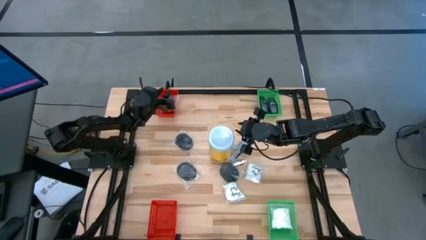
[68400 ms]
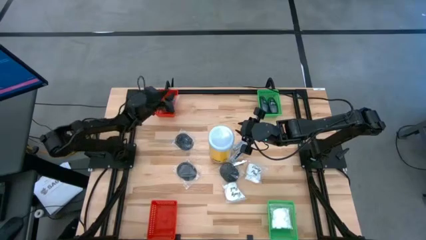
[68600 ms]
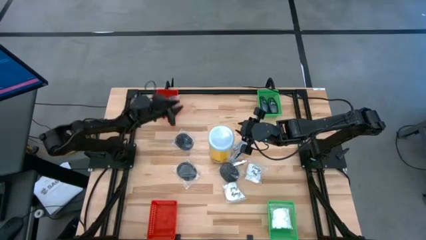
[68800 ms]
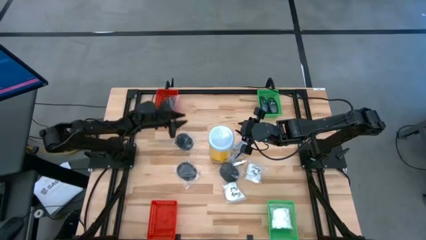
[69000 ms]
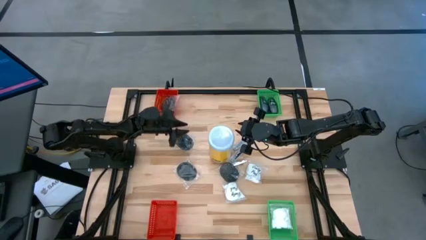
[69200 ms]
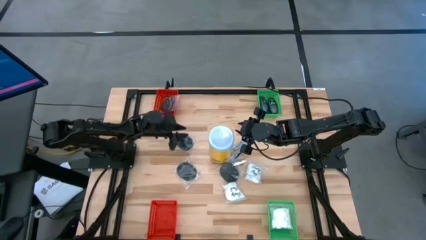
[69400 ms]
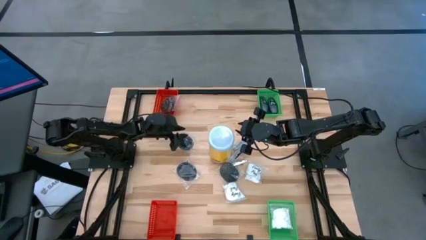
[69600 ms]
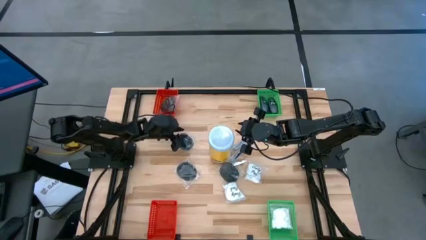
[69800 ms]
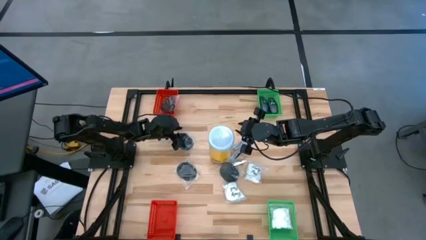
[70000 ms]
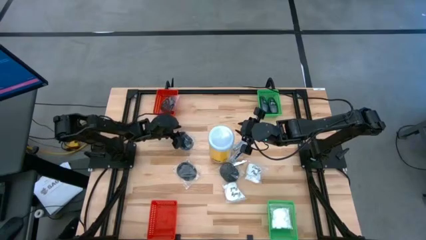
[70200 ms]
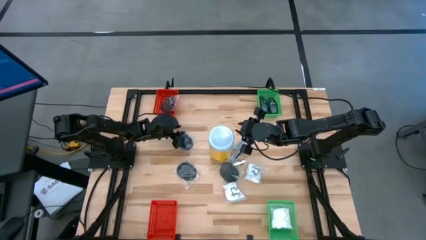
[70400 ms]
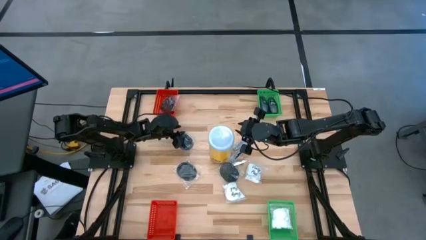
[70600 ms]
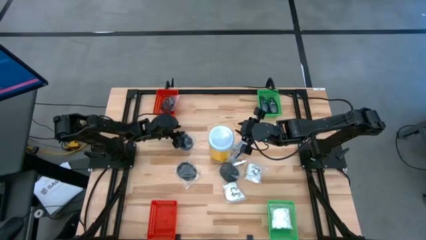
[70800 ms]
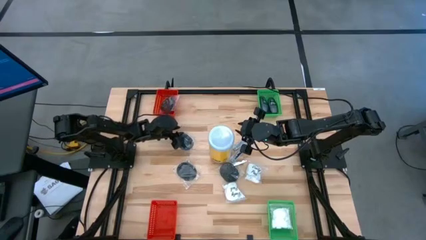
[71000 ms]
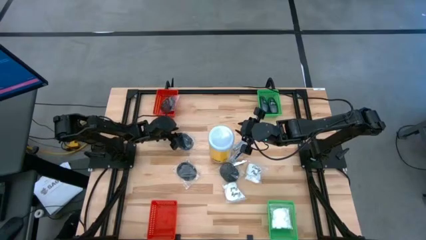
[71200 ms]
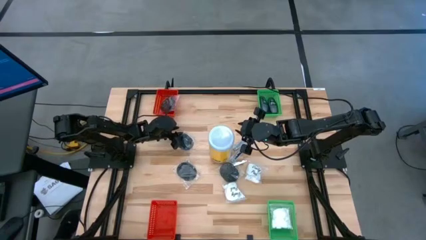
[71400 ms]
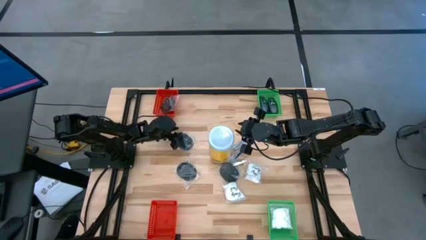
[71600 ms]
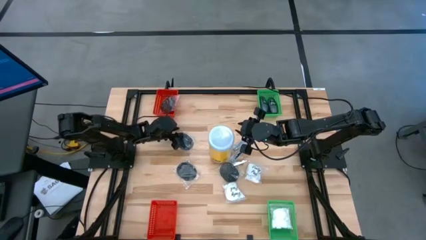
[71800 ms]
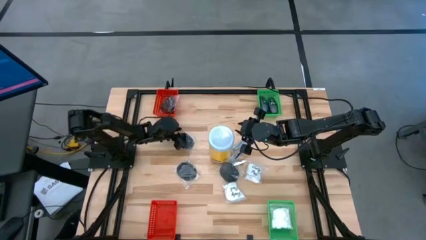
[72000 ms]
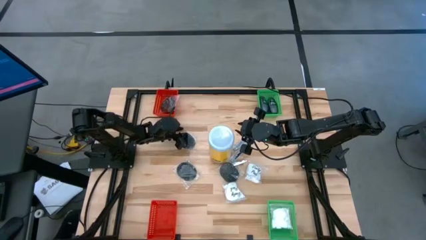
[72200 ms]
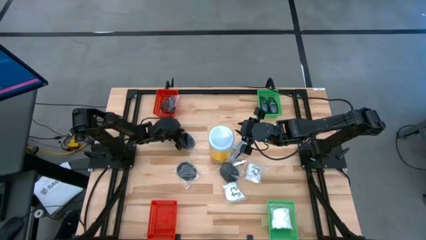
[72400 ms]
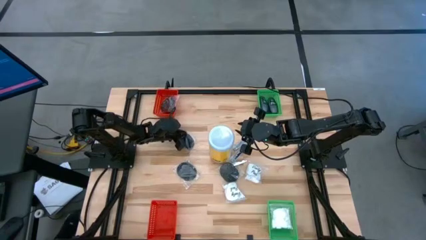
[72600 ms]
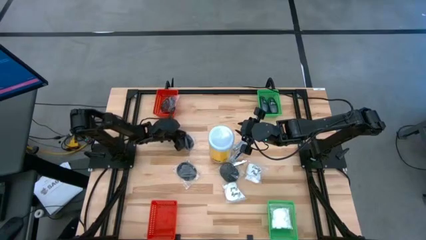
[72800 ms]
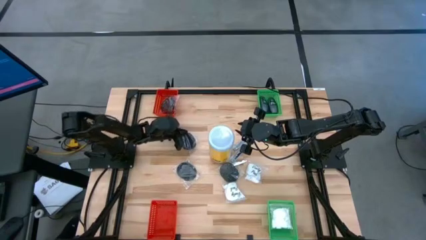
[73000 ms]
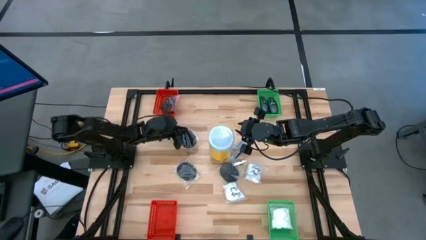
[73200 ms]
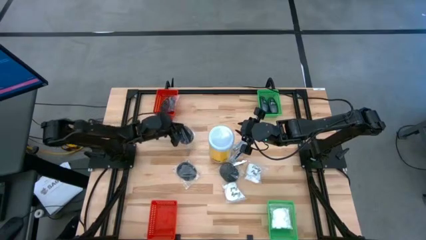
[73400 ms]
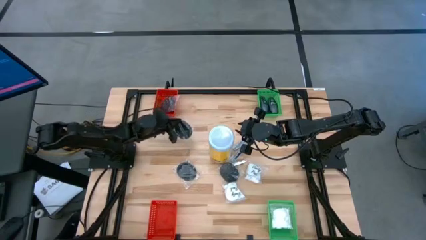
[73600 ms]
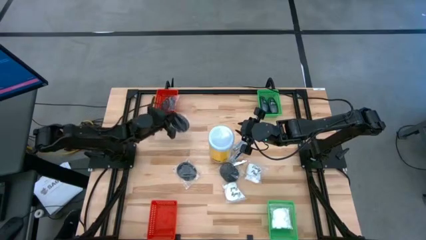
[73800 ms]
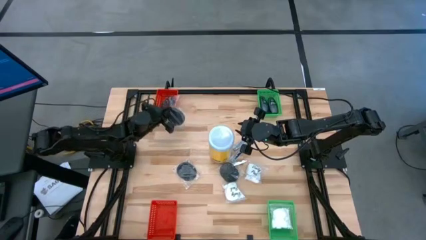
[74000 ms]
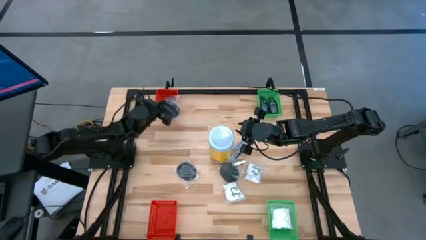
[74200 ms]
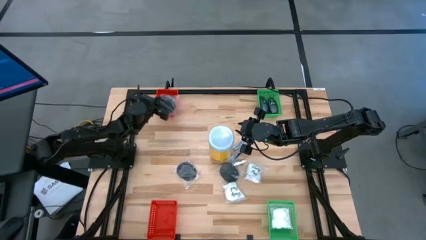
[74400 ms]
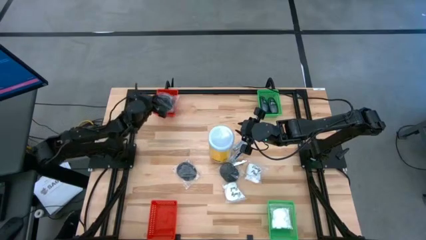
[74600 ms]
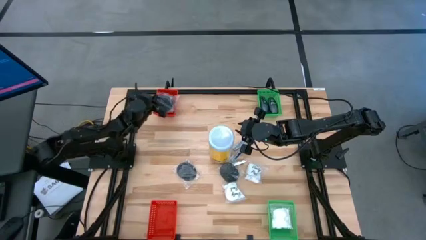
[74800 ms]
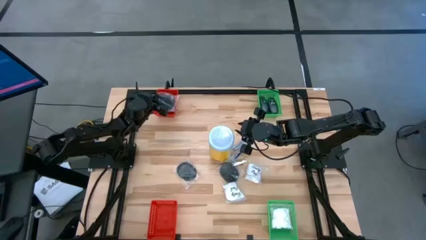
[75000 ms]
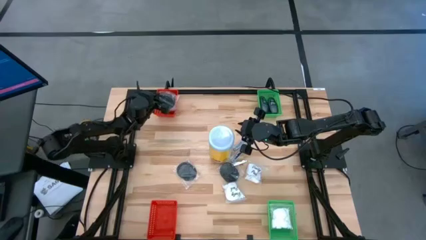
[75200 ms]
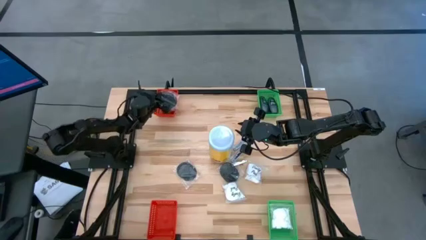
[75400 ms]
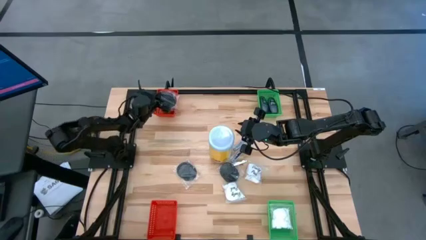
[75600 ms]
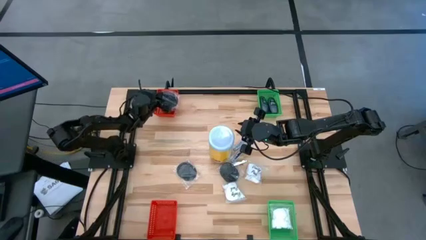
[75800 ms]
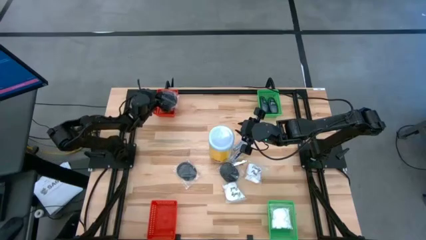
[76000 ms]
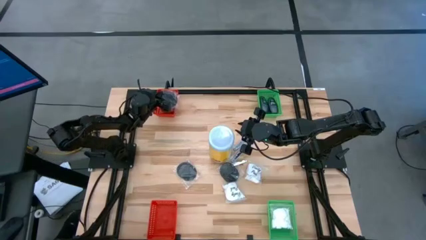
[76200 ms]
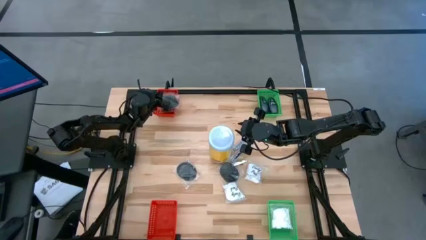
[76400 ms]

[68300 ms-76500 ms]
Task: Pick & Place Travel size toiletries
Put the black hairbrush into the top orange bin

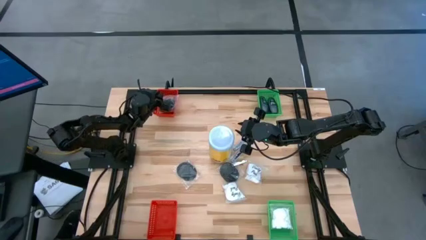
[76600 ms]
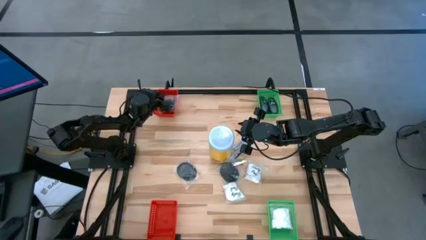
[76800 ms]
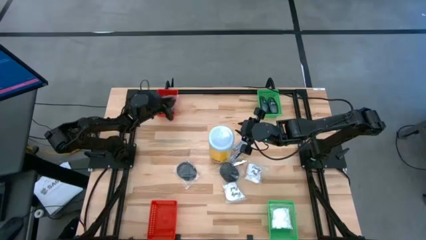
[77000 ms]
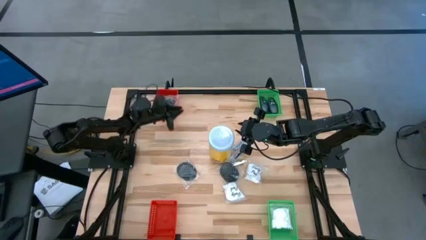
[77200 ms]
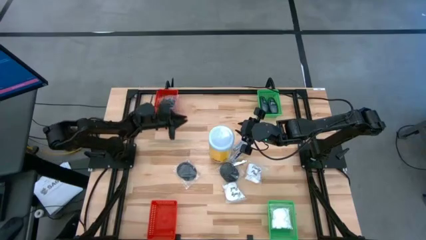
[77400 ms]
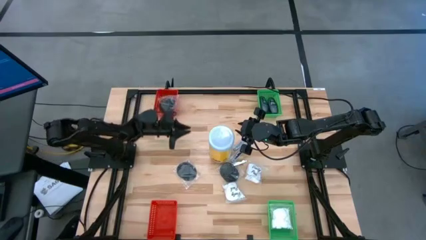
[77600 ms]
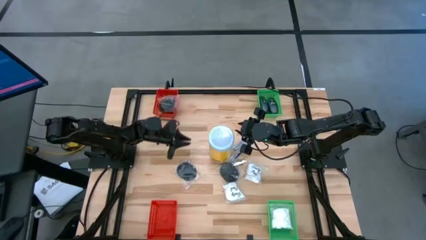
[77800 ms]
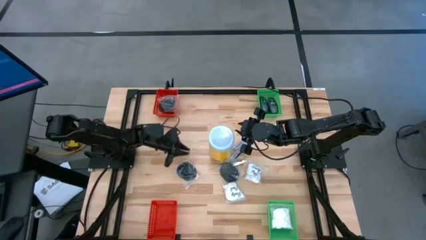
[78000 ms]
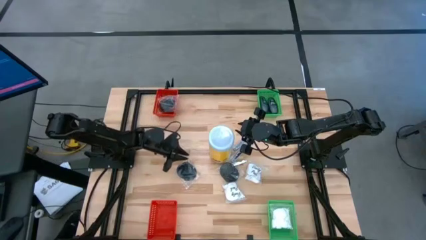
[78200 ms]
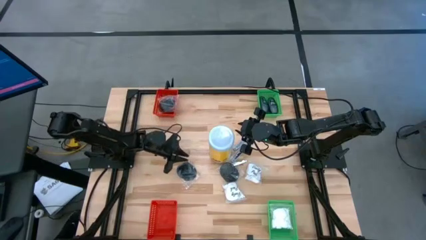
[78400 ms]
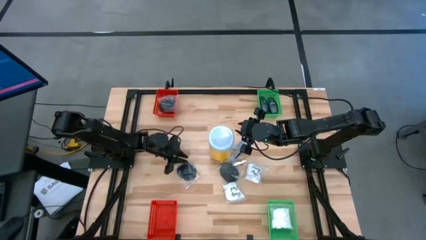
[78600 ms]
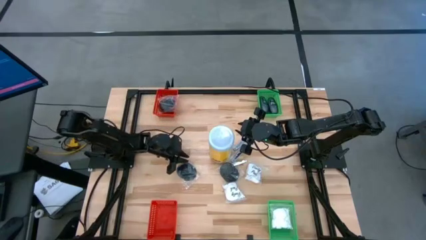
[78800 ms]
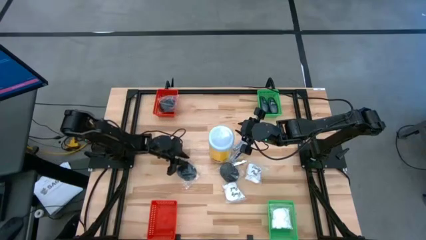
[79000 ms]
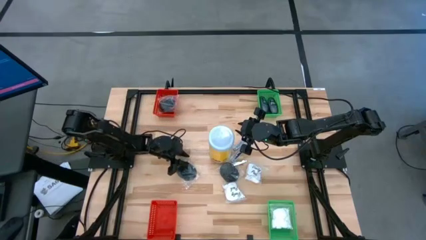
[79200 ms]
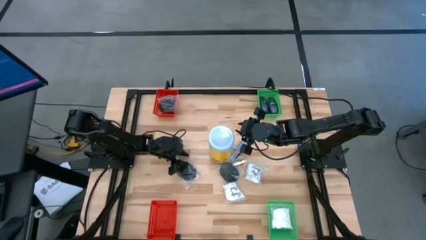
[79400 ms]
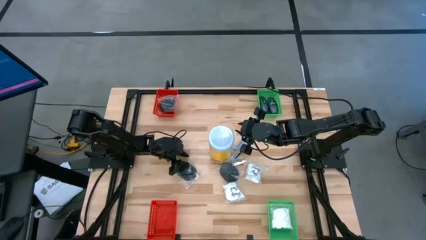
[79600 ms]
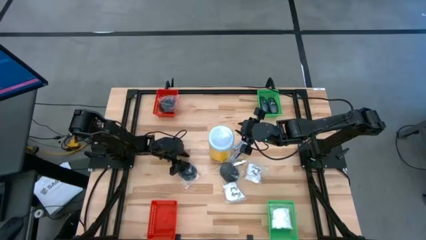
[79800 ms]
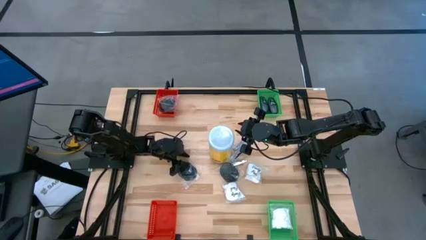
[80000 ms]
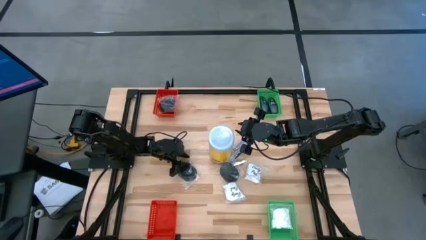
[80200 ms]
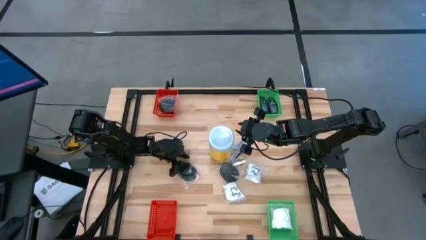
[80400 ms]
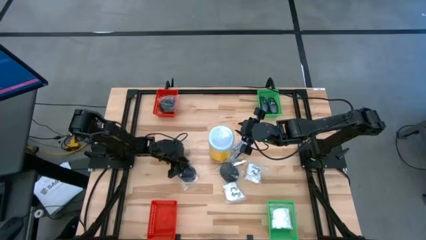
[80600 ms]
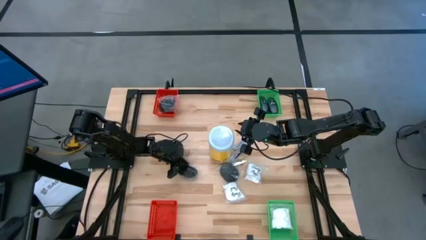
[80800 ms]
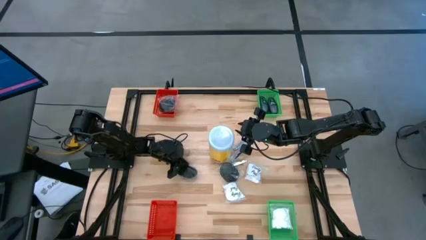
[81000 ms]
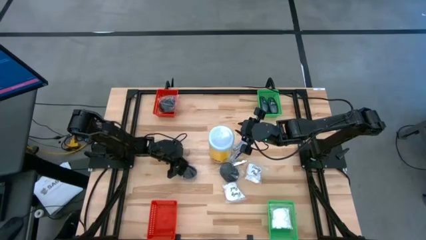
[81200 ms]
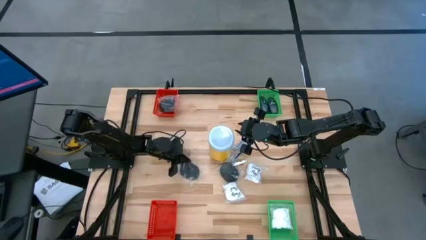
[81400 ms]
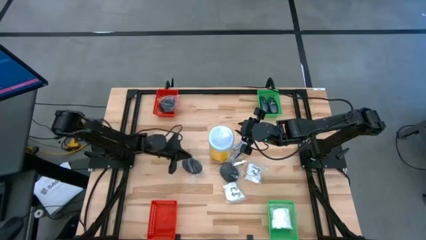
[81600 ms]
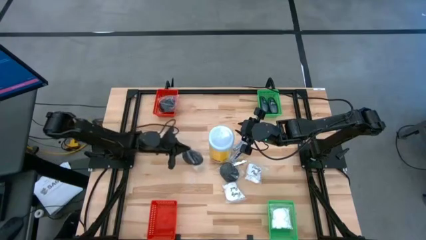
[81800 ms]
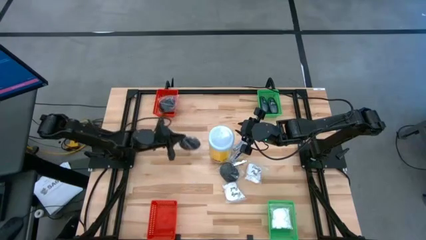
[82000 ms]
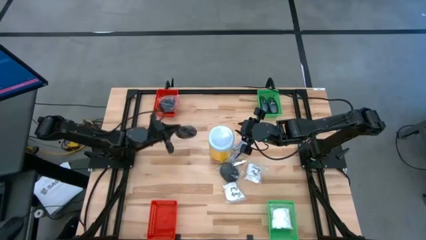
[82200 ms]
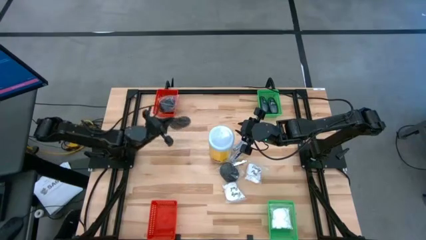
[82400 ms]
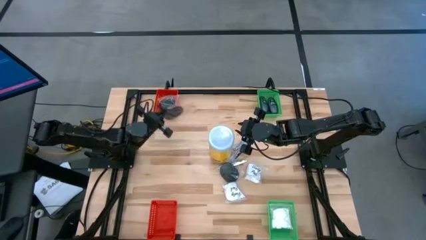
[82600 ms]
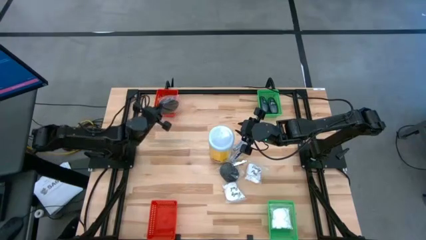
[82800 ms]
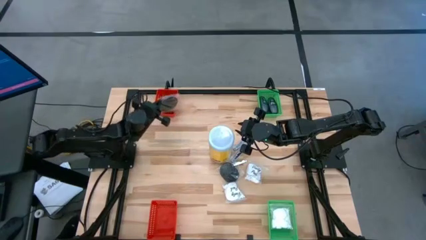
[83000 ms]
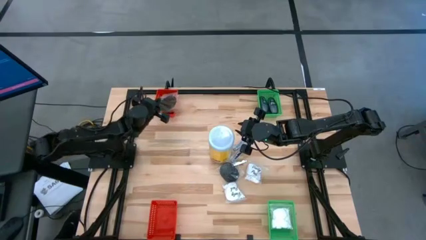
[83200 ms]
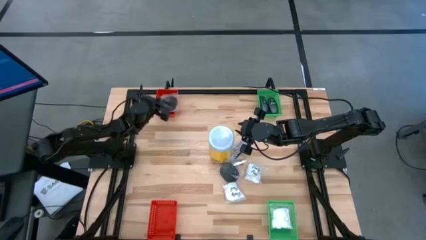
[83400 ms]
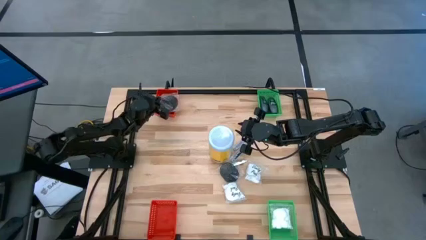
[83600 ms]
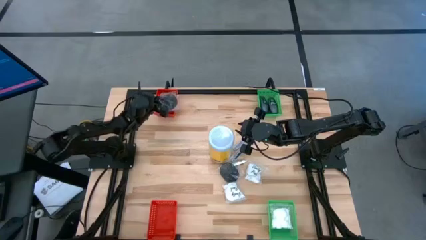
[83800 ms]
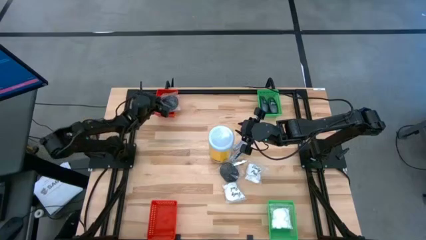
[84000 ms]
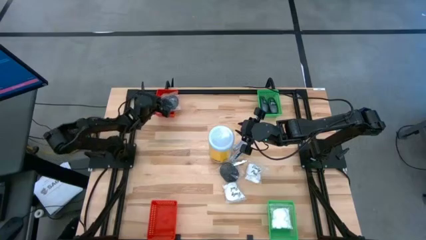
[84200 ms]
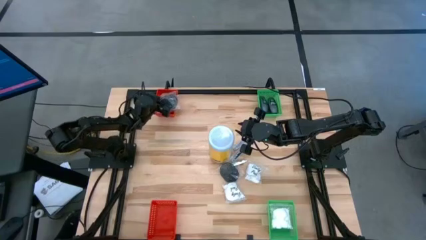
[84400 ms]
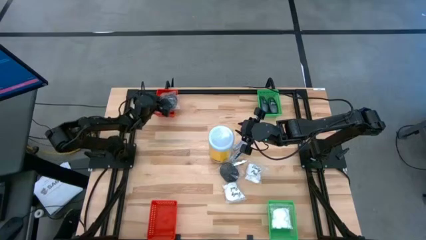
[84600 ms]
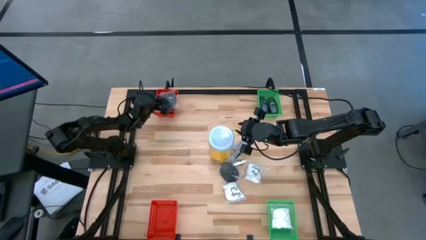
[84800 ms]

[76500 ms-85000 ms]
Put the black hairbrush into the top orange bin
